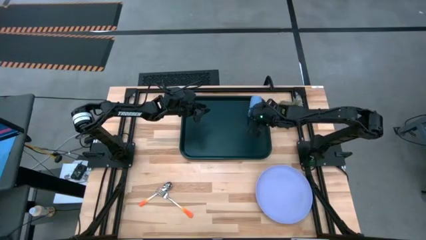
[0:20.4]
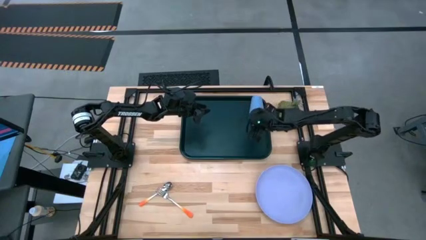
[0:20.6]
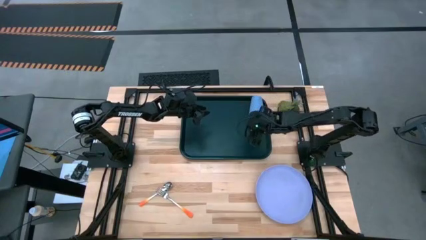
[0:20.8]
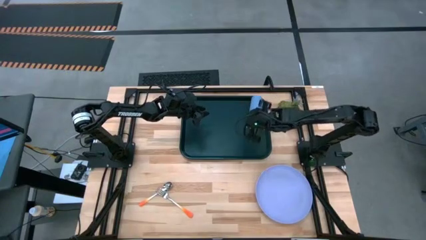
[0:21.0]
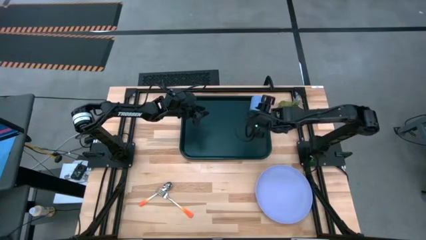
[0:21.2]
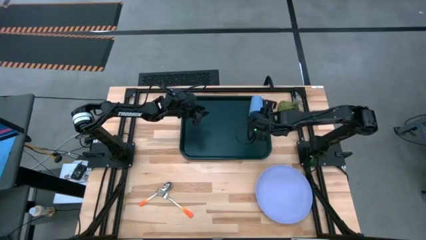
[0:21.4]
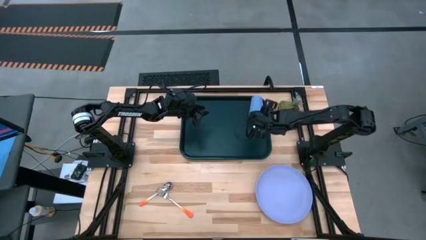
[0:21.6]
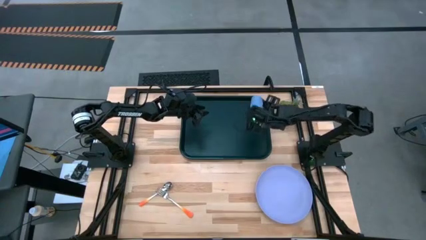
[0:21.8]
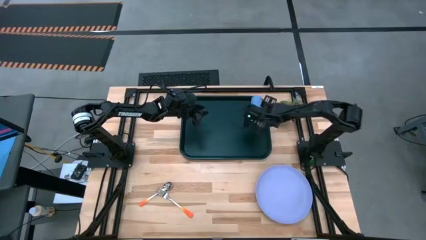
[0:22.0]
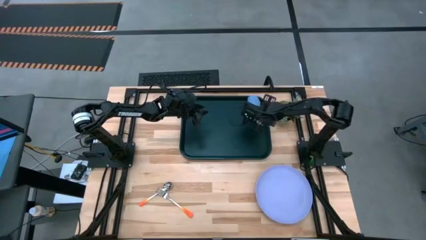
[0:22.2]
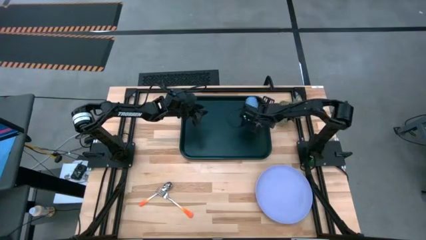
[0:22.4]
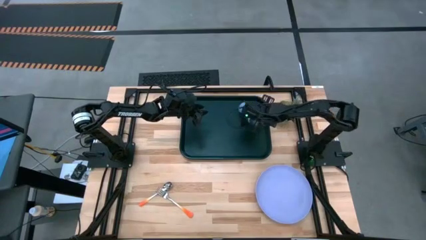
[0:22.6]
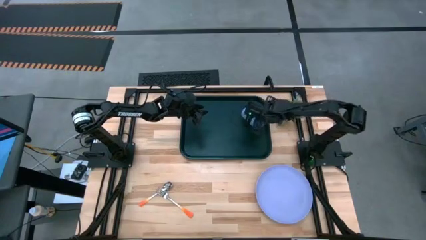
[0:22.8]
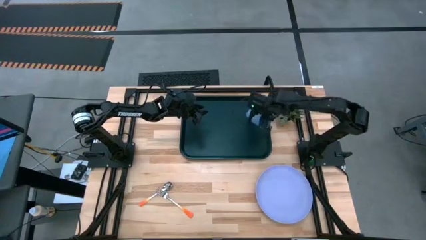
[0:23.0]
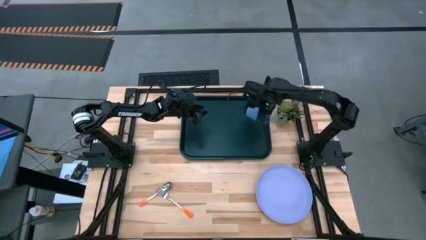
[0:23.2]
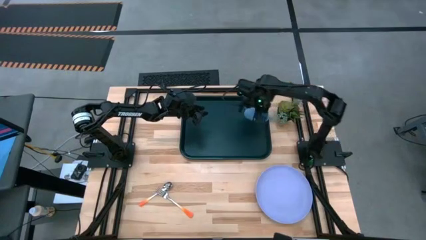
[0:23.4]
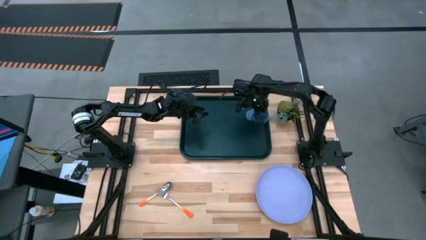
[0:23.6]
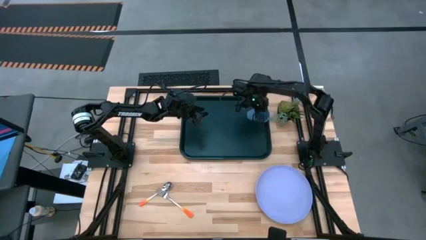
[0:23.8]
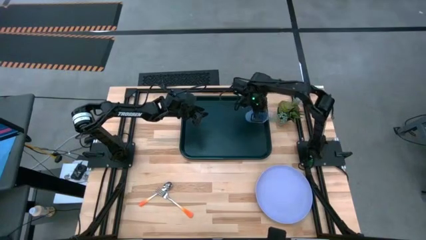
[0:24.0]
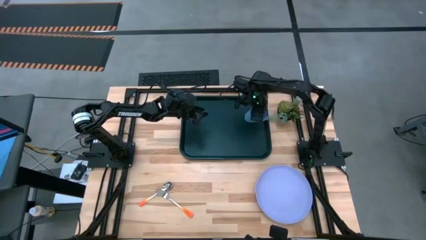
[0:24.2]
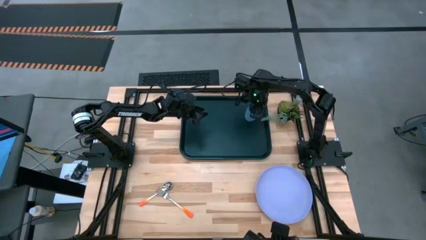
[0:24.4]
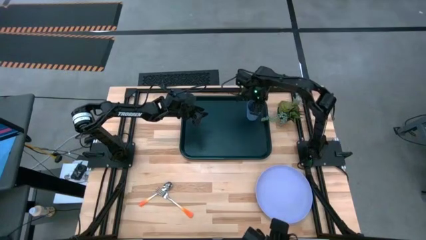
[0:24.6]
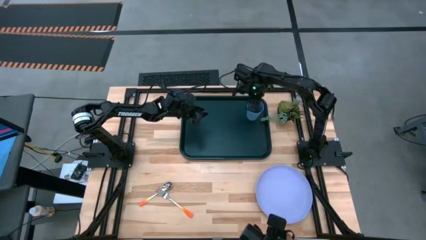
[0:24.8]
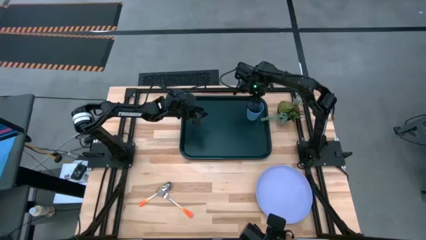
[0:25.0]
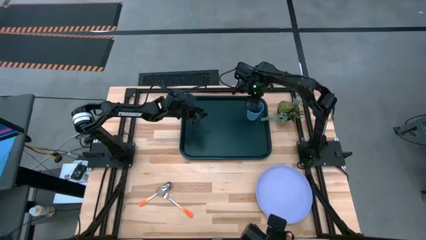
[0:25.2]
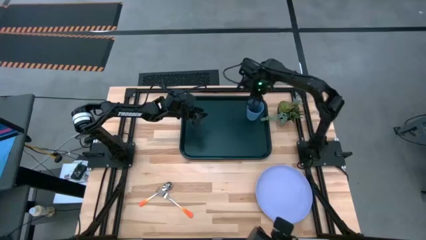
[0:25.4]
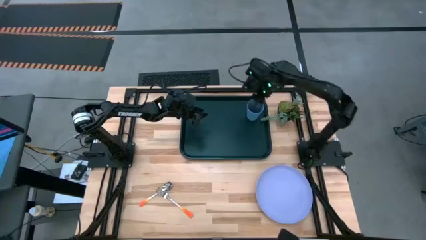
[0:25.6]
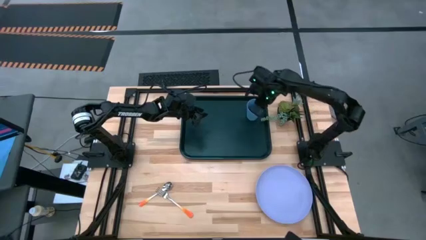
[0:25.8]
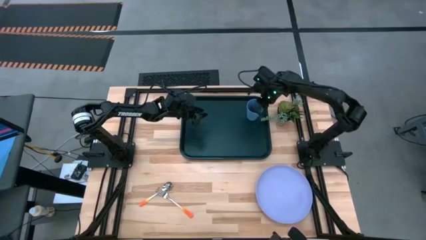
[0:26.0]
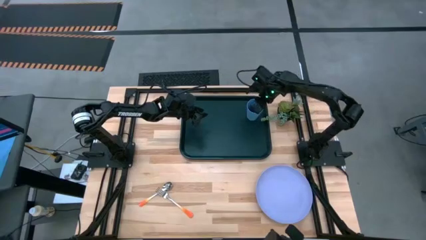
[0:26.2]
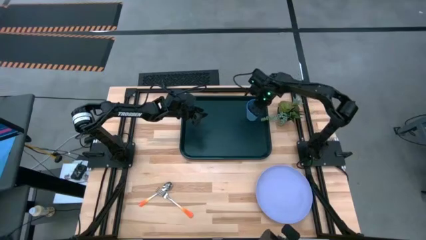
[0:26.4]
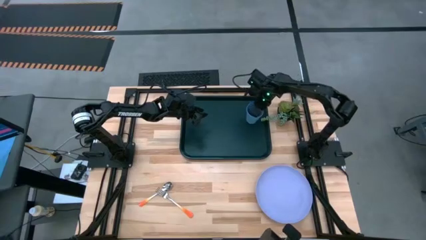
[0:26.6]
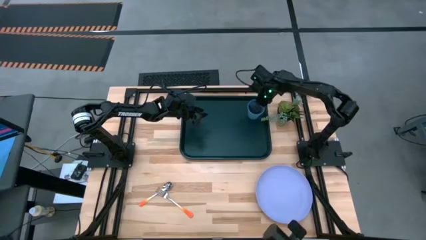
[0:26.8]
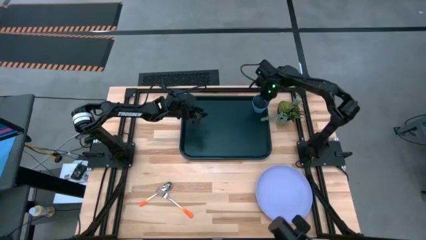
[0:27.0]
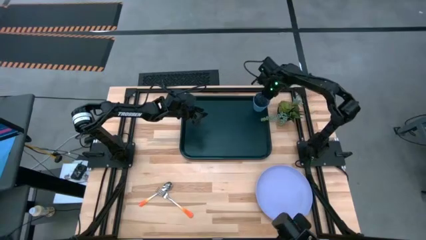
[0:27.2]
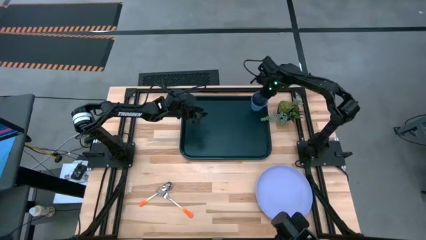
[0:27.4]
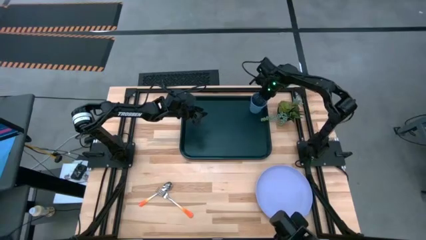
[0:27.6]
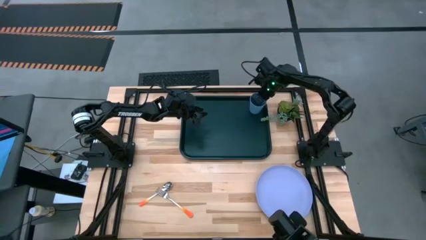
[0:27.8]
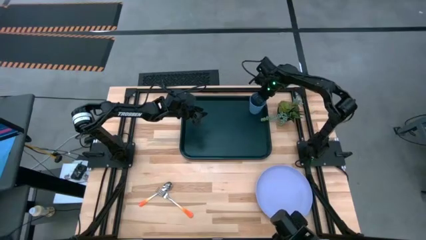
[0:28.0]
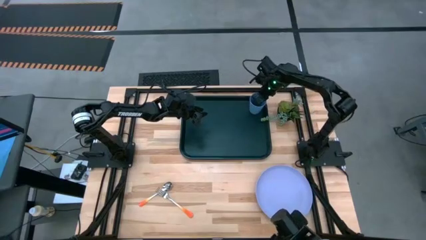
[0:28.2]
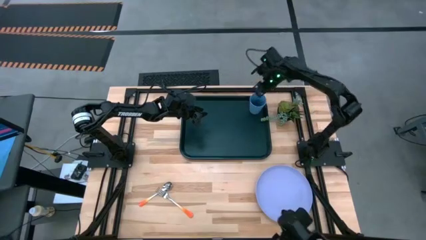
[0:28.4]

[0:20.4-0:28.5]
Task: Pick and place plate/cup/fork/spoon on tray
Put the blue cup on the black tray

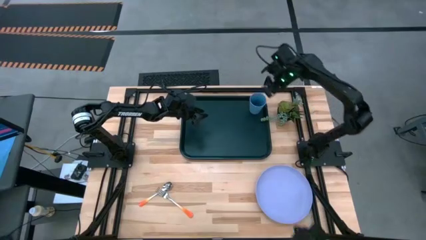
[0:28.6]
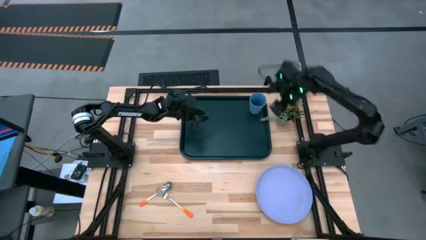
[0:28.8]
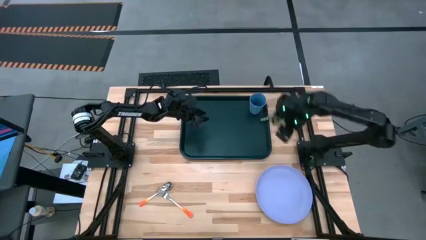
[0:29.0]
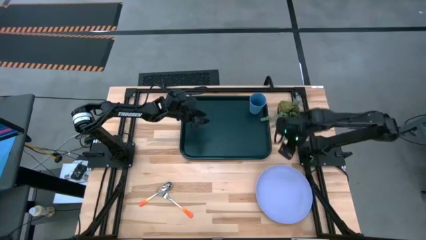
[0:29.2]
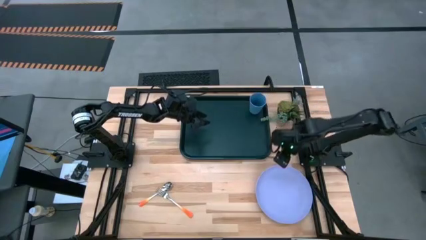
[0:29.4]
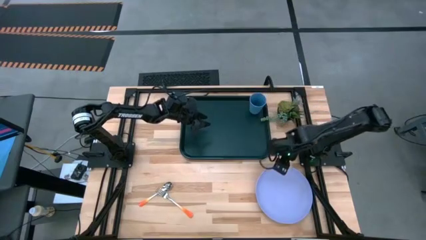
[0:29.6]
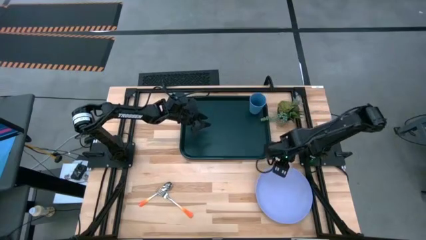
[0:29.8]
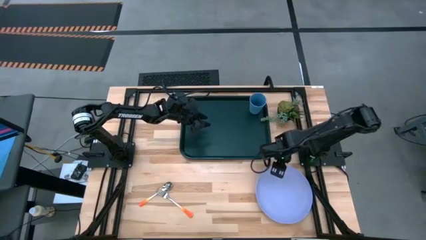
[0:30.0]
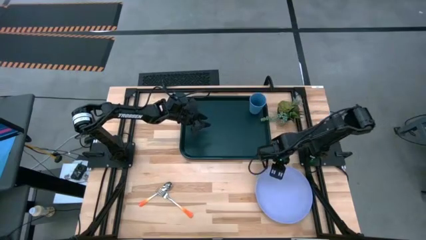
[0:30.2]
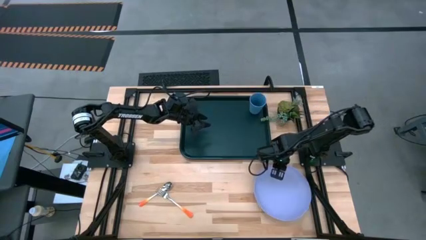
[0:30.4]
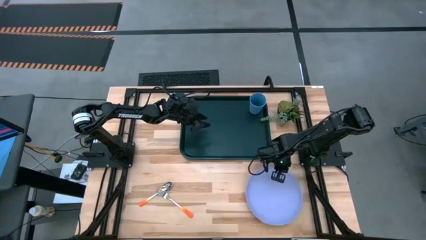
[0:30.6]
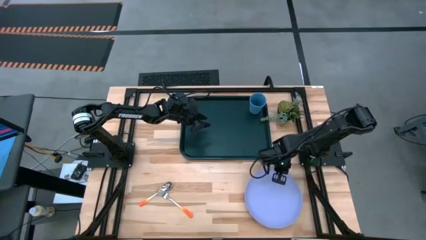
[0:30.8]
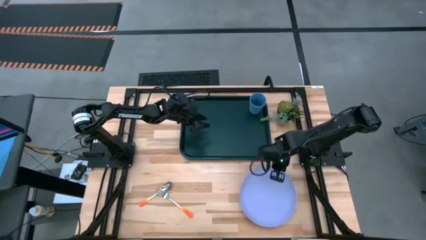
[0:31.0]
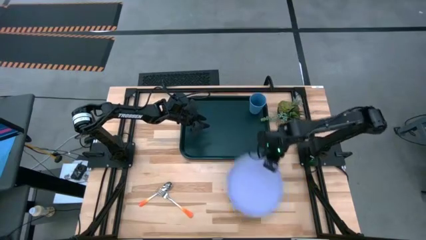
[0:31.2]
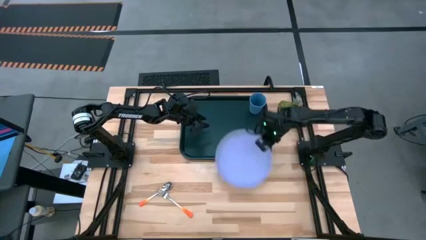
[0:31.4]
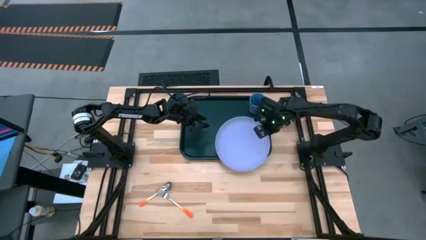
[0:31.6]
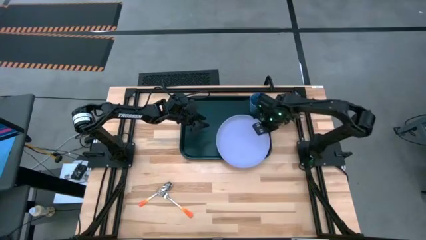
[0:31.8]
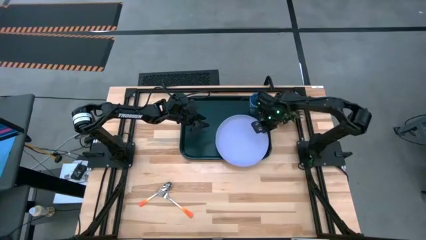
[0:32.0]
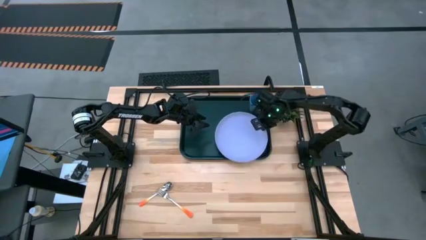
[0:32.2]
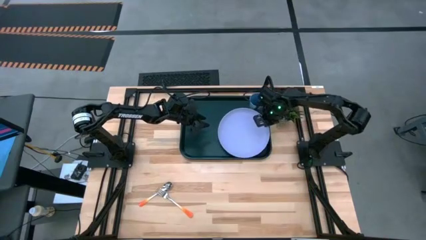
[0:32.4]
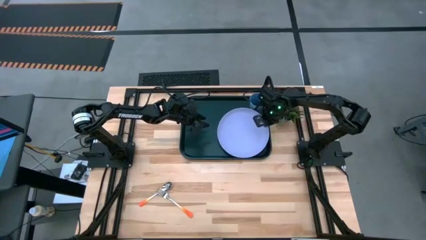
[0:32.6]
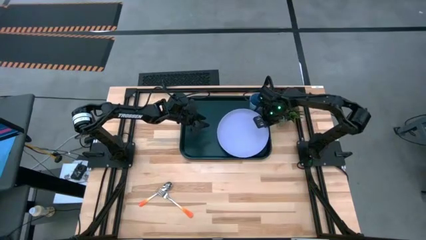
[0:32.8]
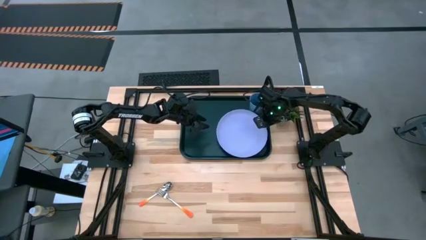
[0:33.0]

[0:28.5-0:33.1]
Put the blue plate on the black tray at the bottom of the blue cup

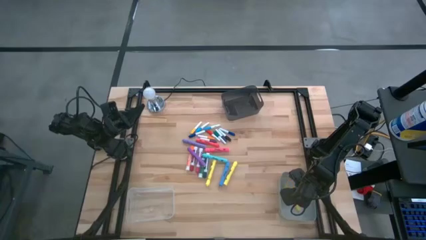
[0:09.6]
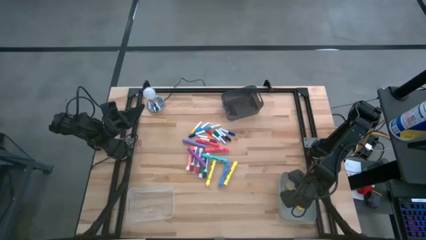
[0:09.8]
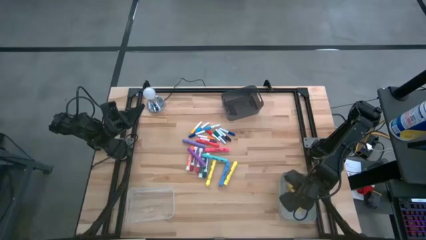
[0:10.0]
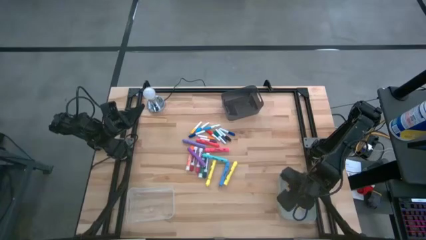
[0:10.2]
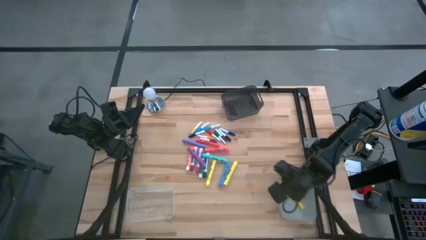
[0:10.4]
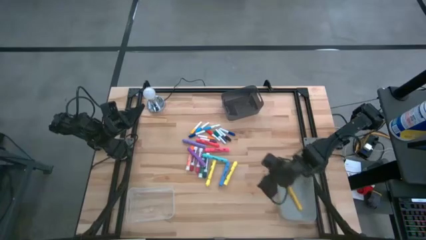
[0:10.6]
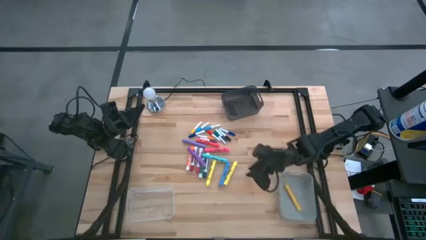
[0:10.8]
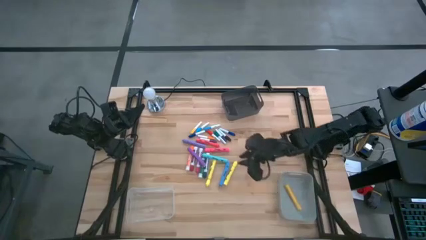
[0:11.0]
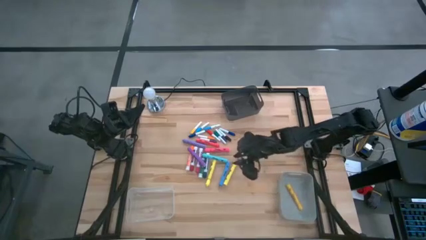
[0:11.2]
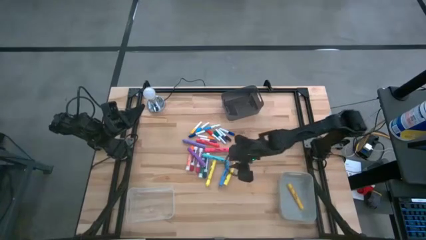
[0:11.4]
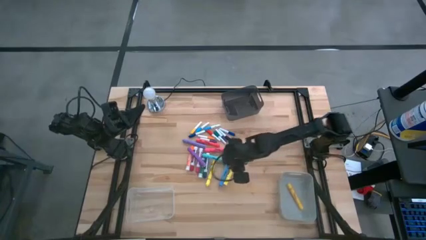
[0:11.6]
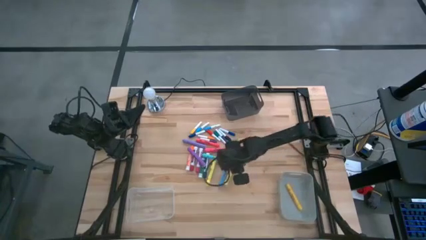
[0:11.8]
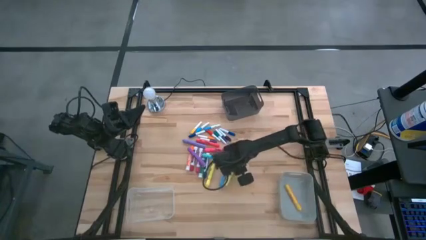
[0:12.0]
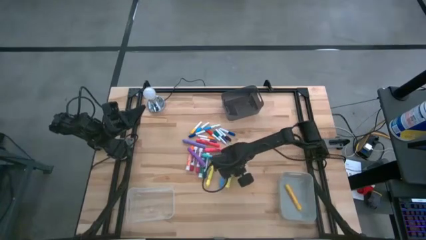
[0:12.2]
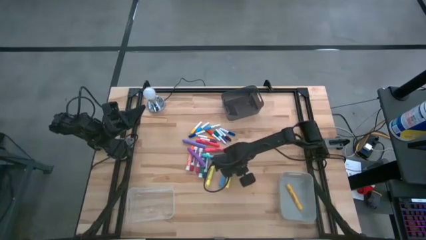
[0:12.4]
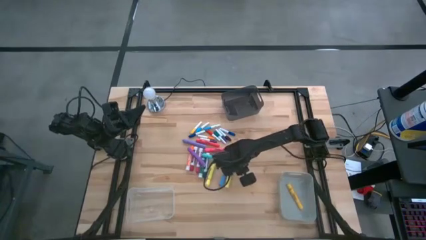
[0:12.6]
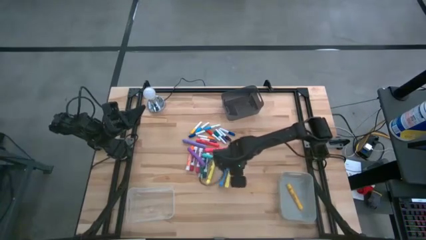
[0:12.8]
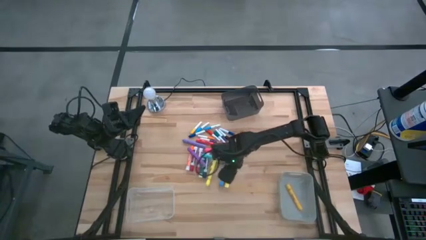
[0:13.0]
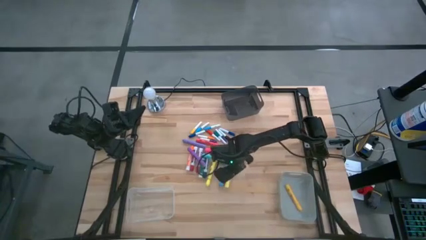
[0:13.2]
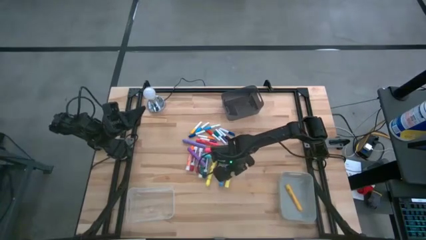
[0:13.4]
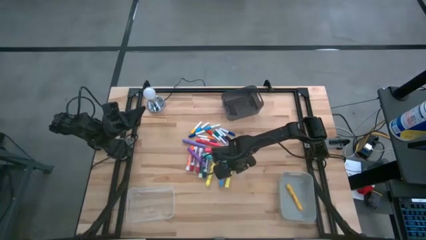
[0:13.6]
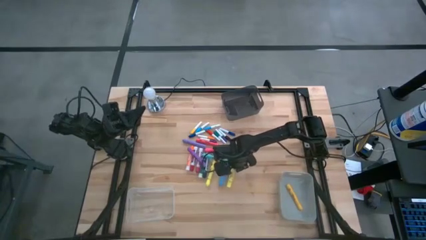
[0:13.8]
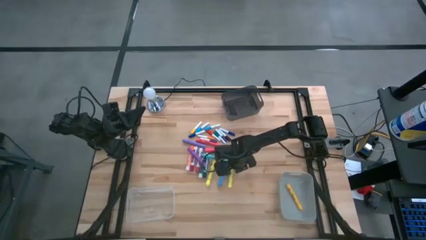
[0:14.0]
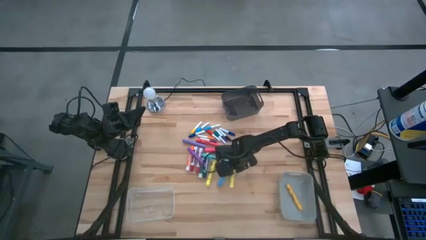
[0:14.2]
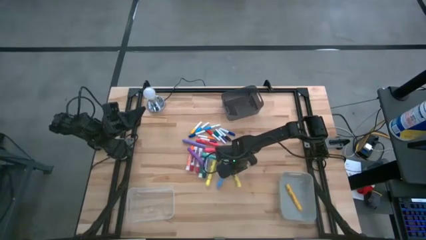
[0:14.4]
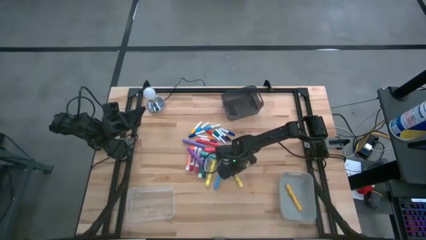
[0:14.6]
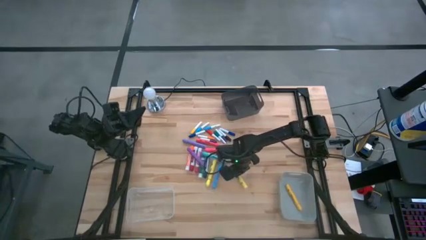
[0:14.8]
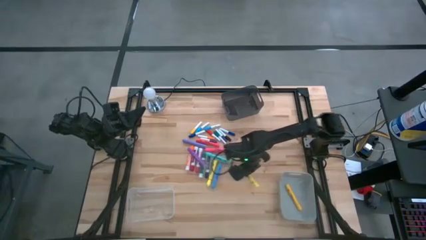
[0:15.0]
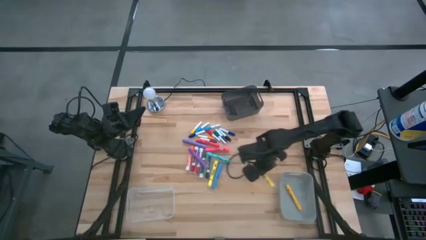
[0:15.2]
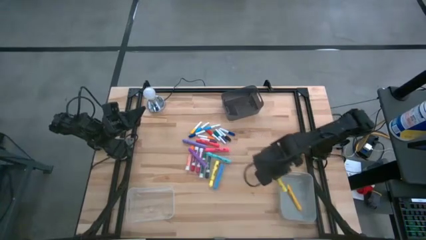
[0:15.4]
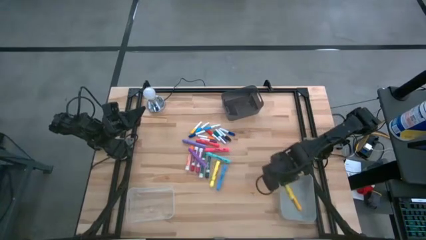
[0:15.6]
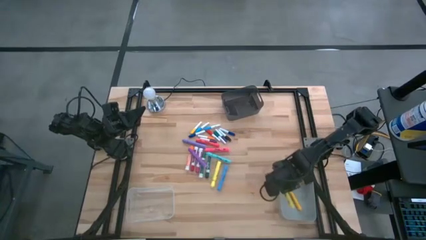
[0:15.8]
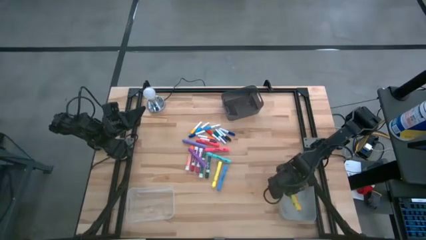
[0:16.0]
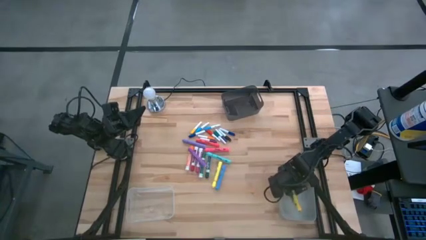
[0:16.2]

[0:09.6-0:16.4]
Task: Pick & Place Markers
Put the right light yellow highlighter pen into the gray bin
